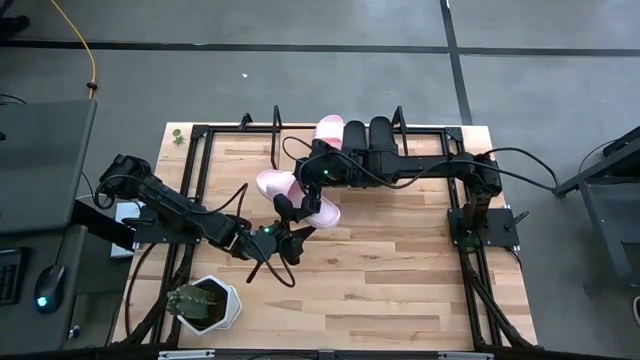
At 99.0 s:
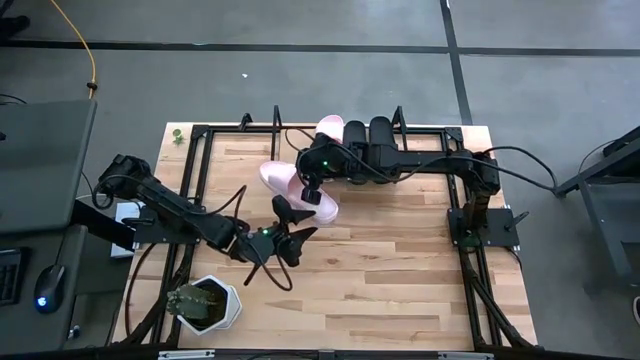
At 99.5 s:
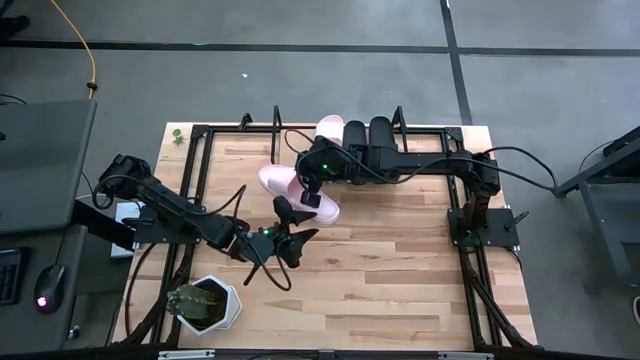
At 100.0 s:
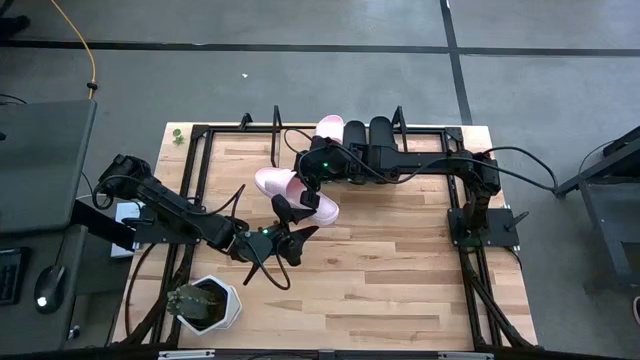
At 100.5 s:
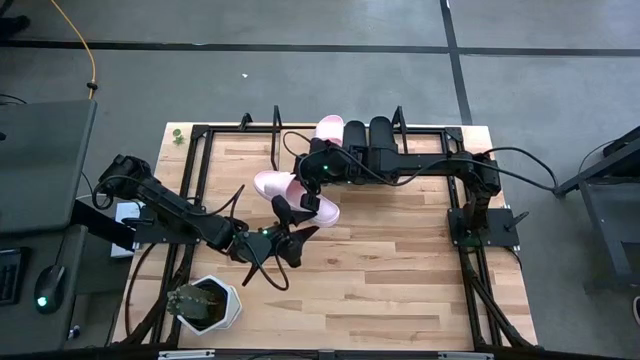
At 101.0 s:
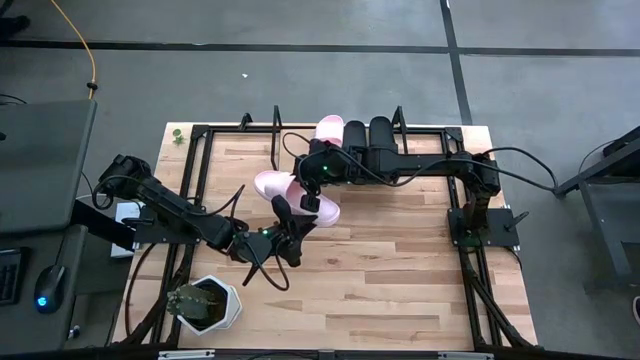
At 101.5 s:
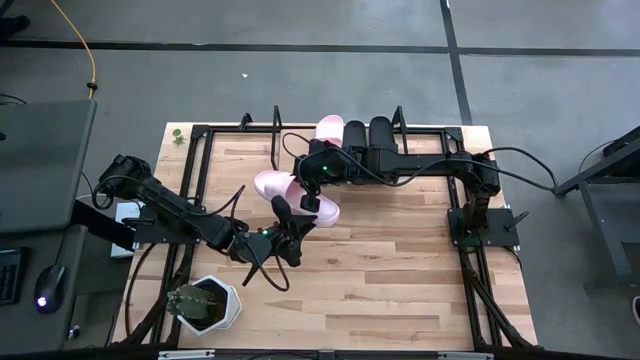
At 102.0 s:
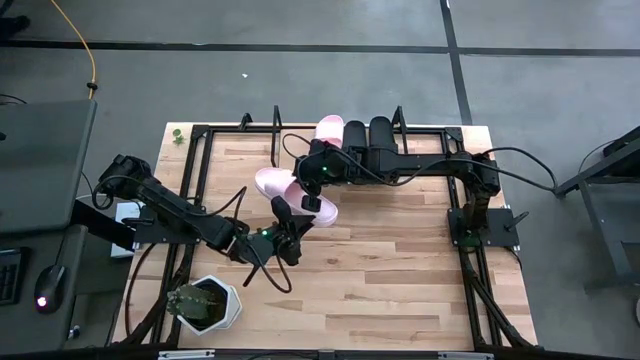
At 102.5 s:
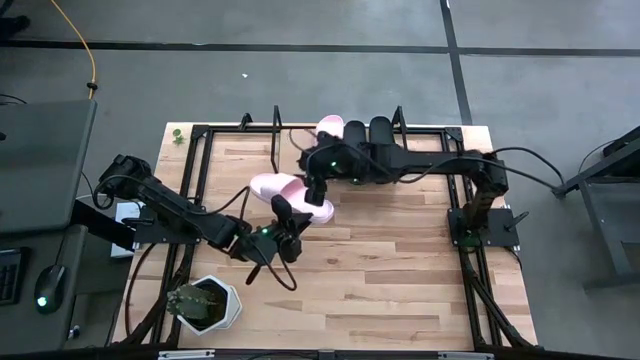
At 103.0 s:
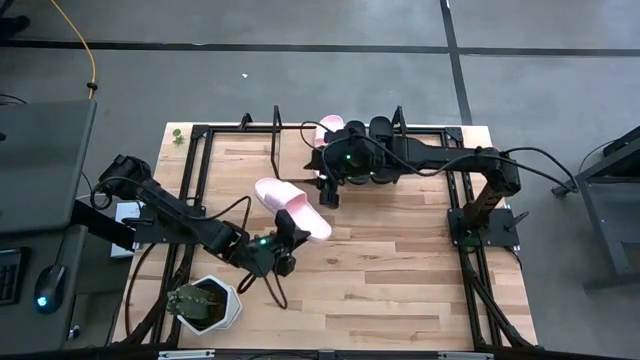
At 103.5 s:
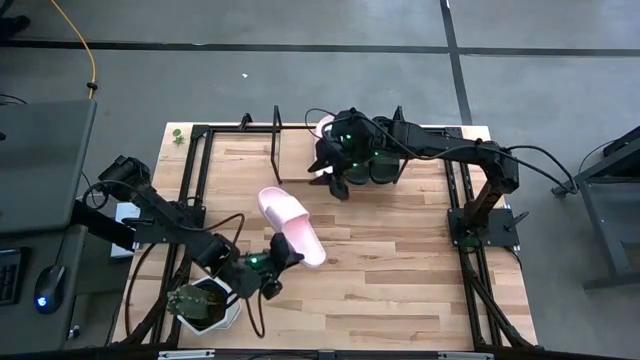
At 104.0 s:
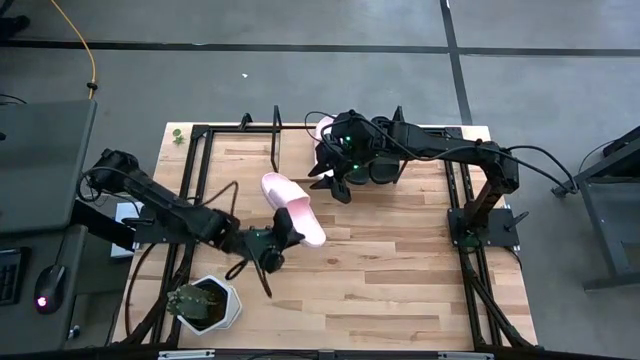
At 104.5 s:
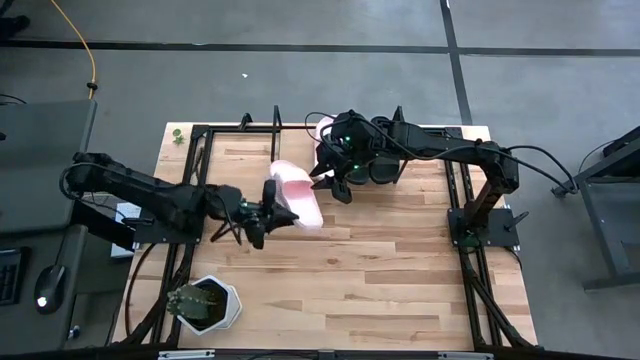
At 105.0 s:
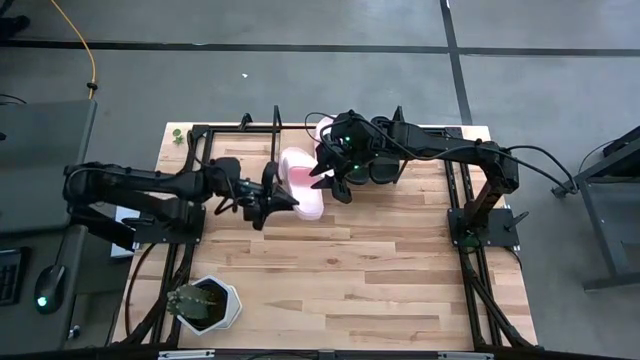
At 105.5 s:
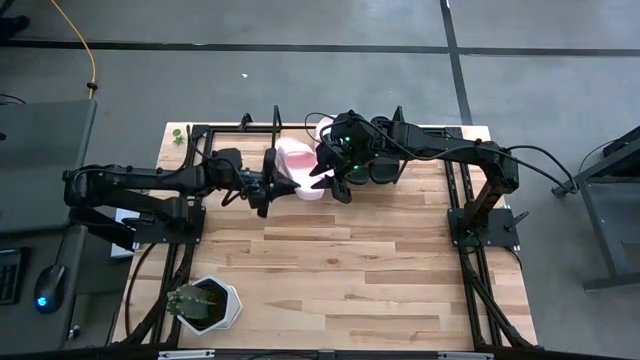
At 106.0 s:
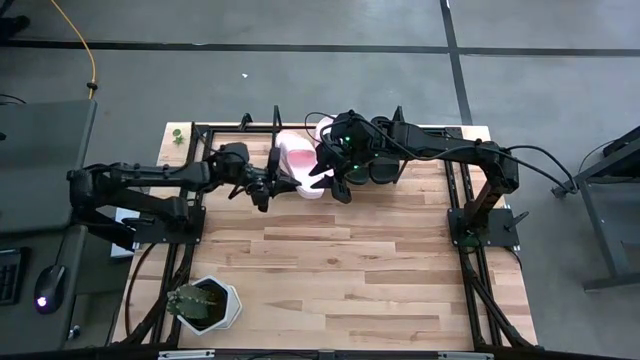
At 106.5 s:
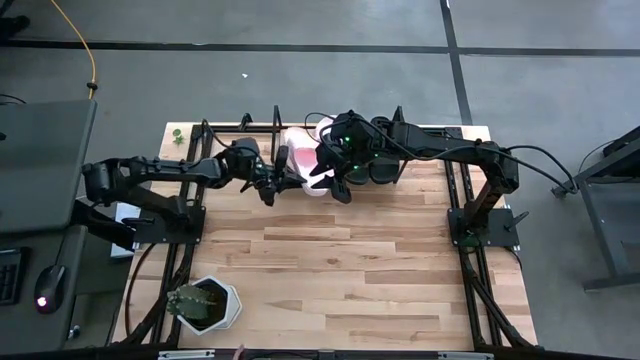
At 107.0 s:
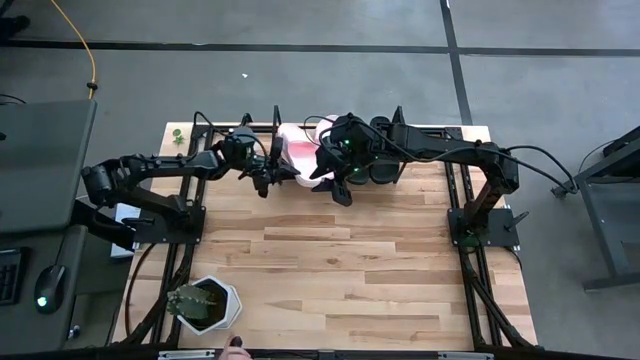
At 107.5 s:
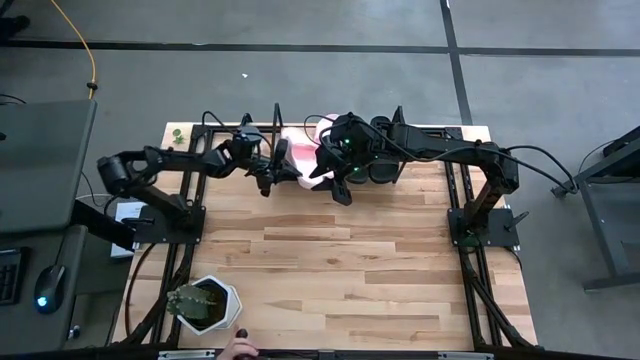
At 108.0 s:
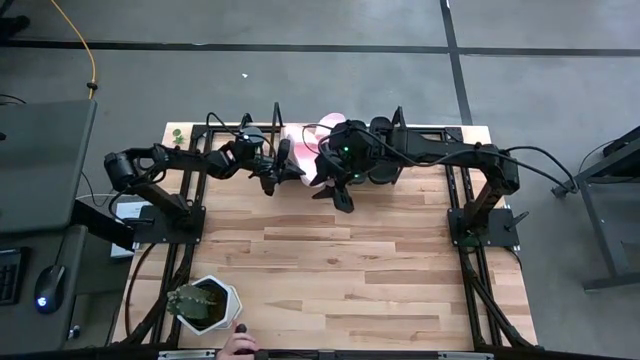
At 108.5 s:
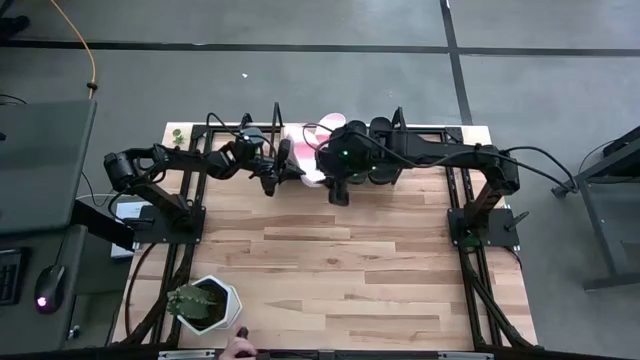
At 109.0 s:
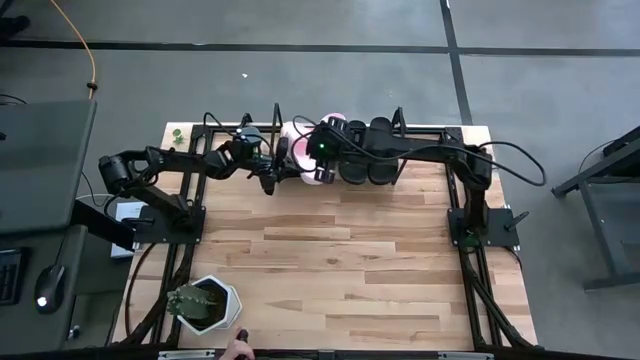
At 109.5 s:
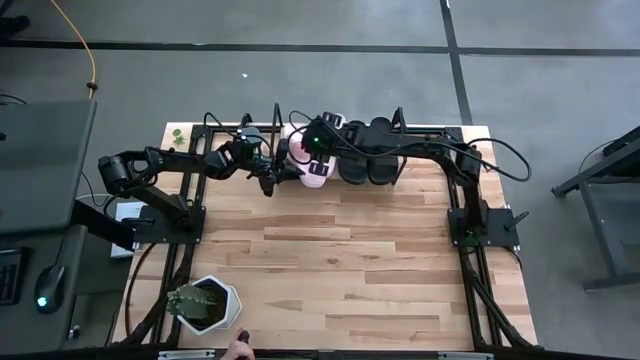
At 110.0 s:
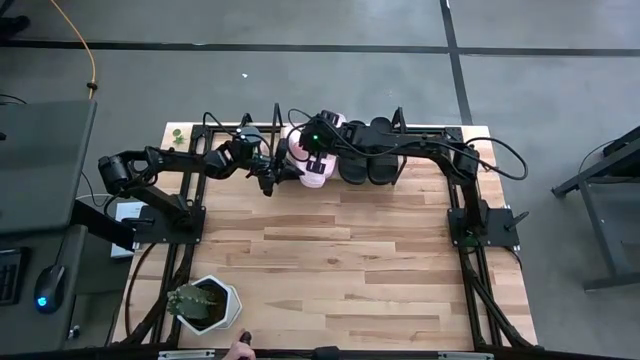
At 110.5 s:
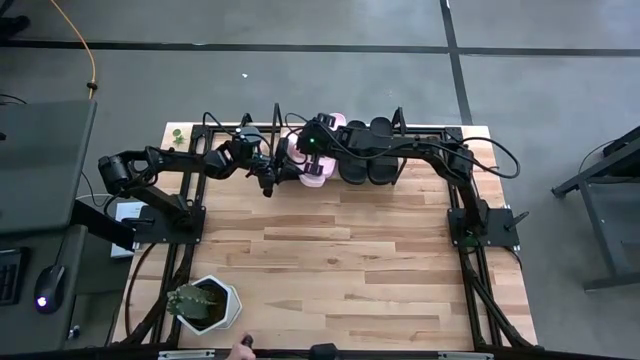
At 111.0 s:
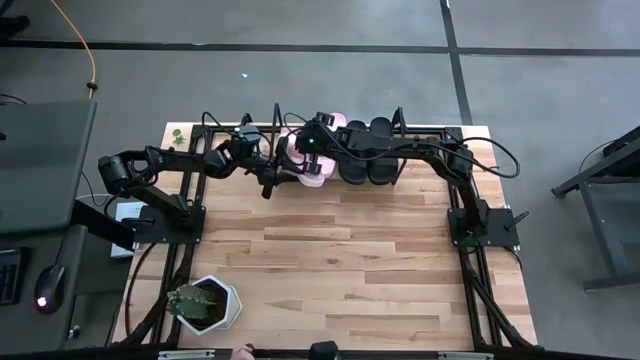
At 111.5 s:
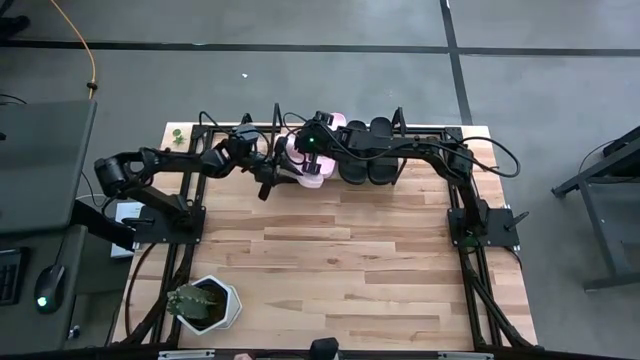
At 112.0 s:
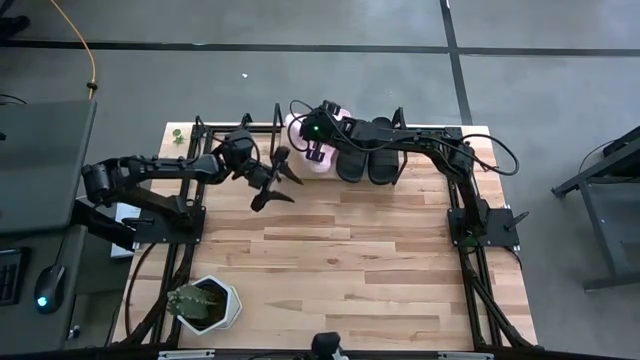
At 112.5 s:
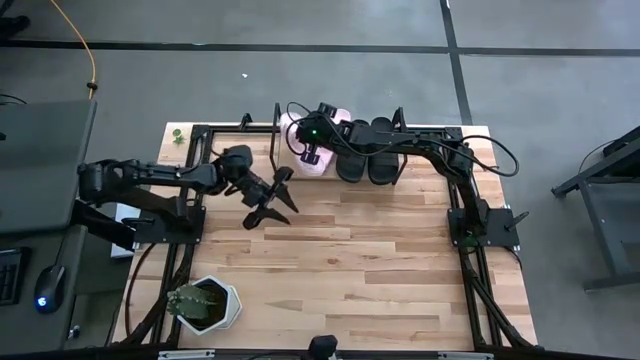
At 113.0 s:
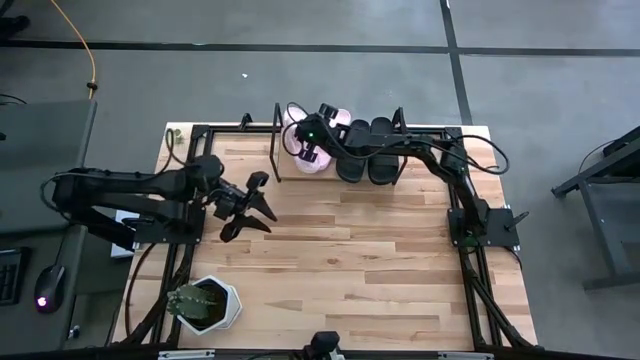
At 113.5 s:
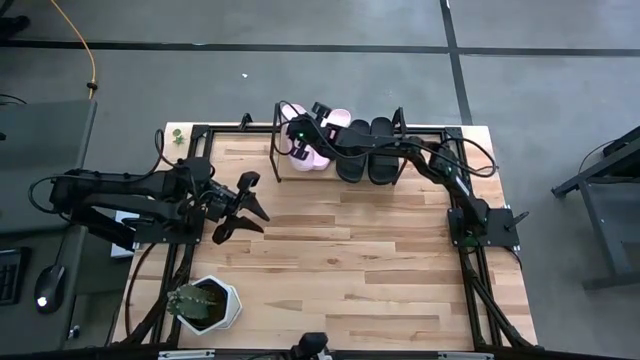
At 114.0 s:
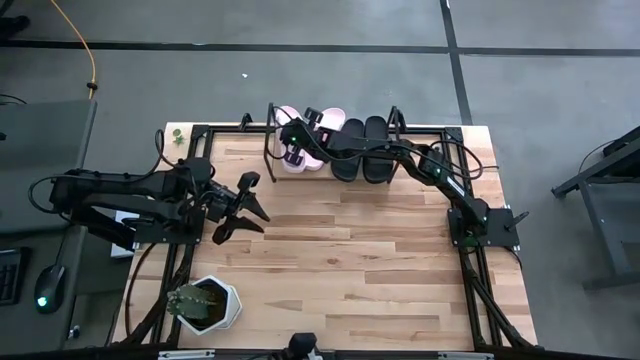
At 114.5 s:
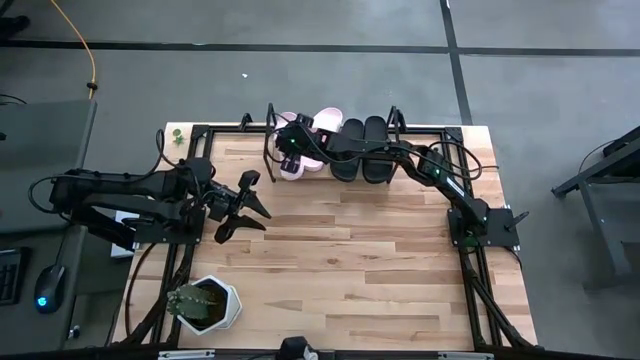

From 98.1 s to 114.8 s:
Task: Pick and place slides into the shelf
Put the pink slide on the shelf

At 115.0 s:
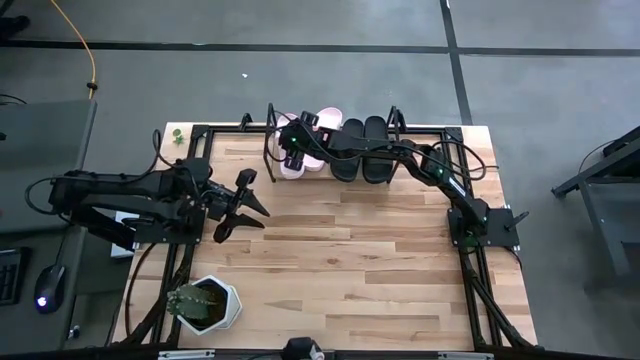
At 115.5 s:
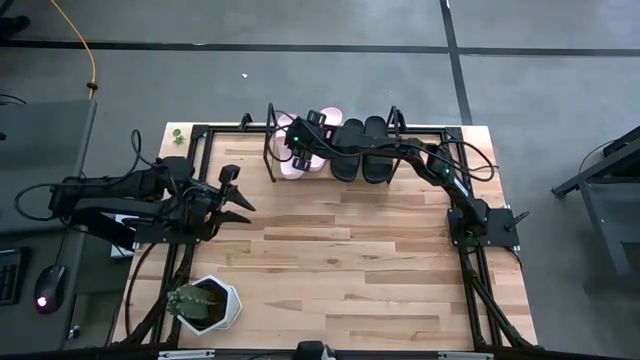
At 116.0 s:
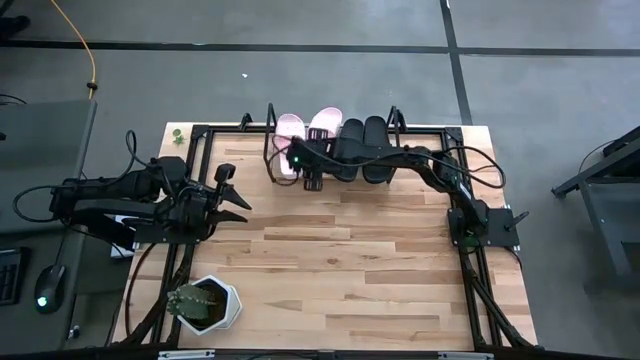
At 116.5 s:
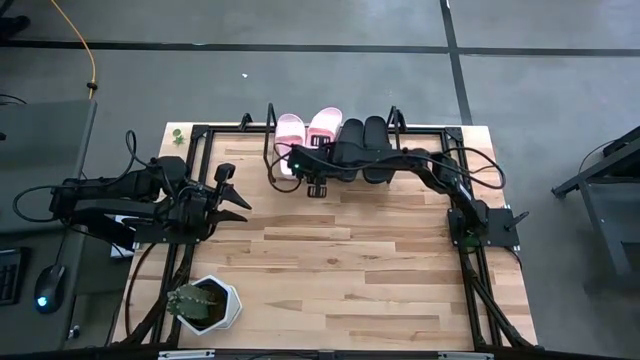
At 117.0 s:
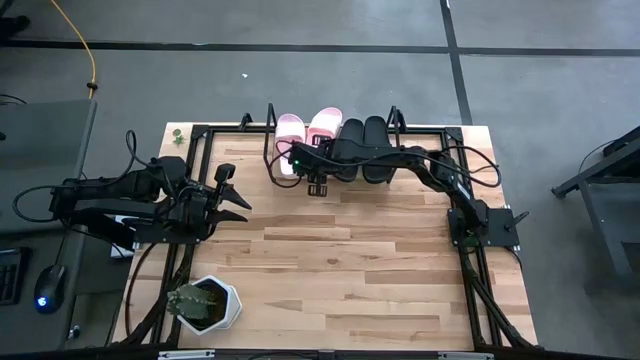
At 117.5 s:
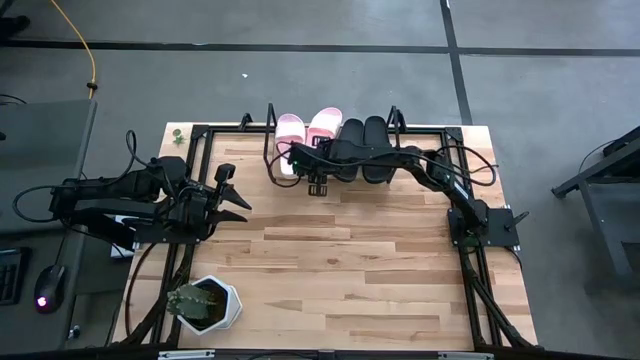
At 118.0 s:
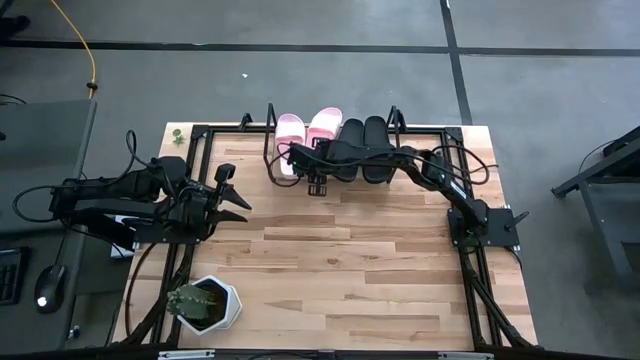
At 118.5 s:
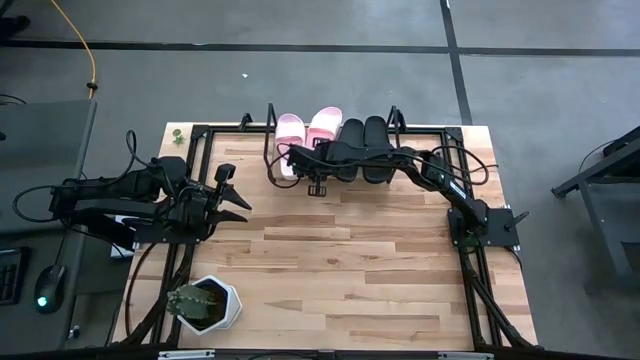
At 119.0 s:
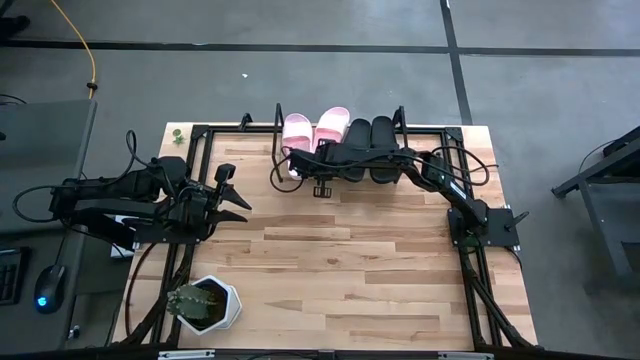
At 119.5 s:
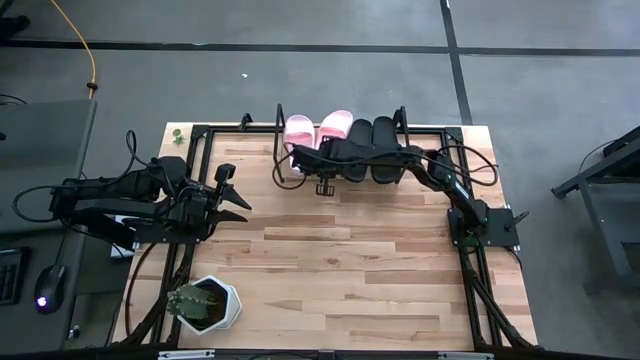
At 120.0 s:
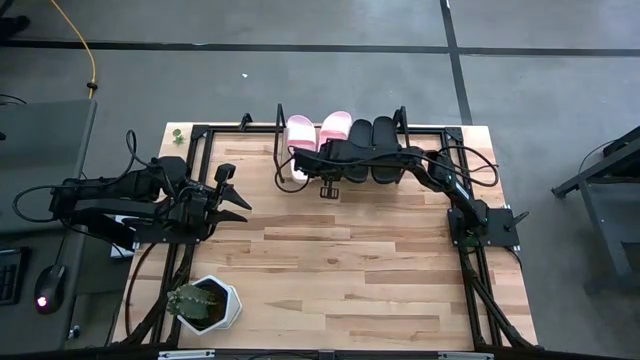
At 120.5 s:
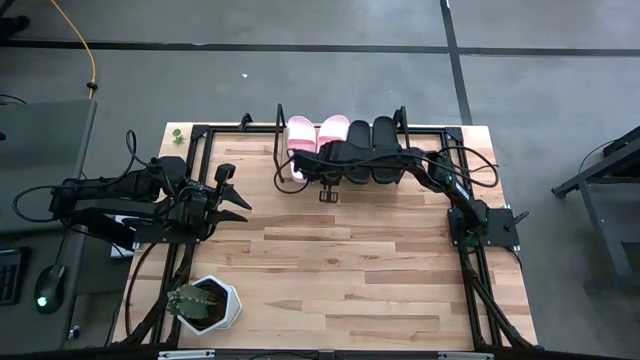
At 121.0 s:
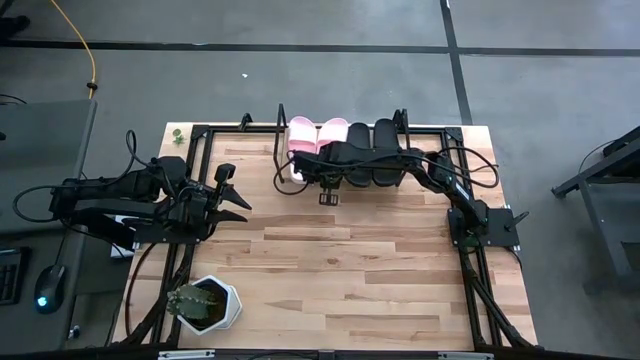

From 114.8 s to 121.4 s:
Adjust the pink slide on the shelf
